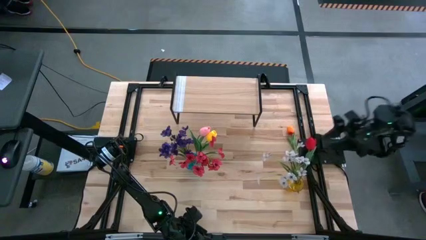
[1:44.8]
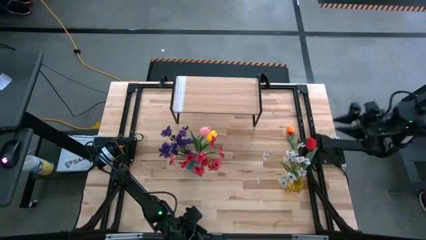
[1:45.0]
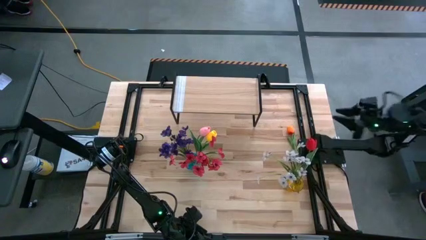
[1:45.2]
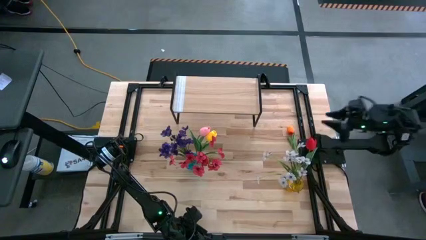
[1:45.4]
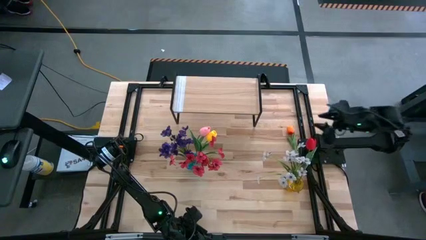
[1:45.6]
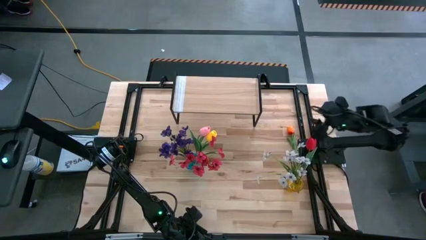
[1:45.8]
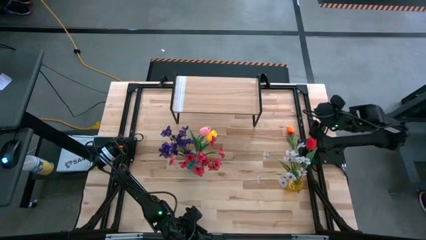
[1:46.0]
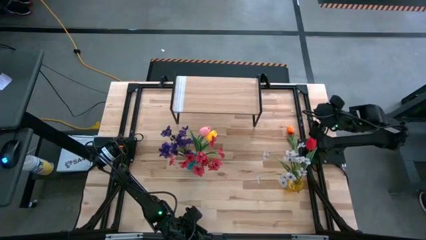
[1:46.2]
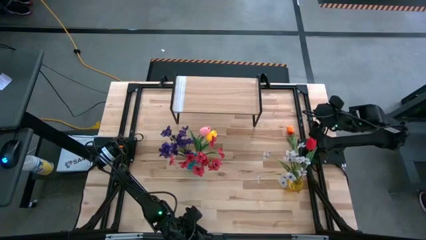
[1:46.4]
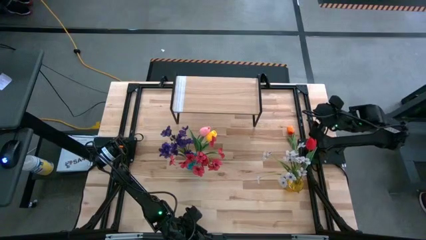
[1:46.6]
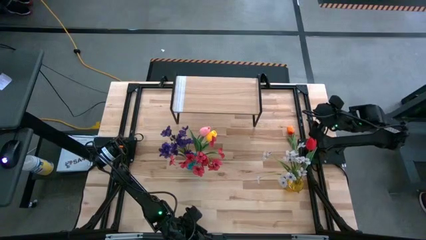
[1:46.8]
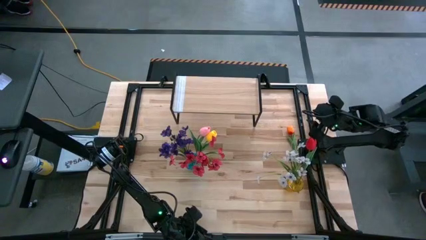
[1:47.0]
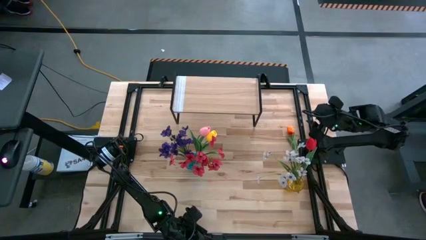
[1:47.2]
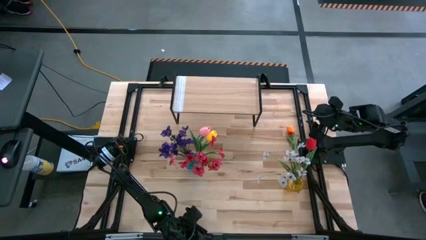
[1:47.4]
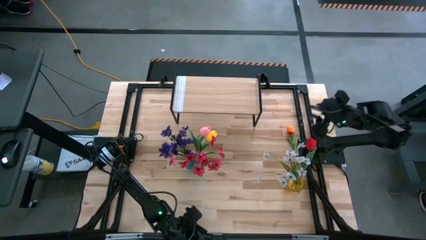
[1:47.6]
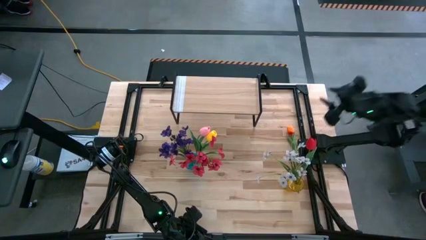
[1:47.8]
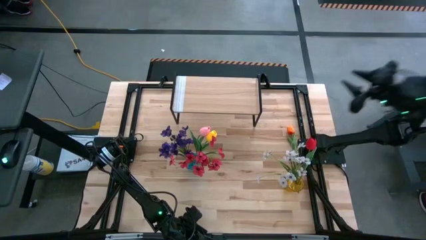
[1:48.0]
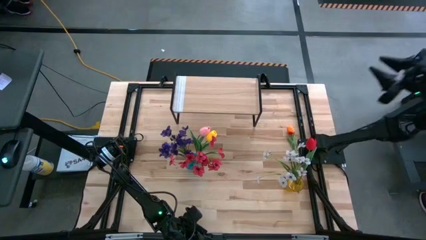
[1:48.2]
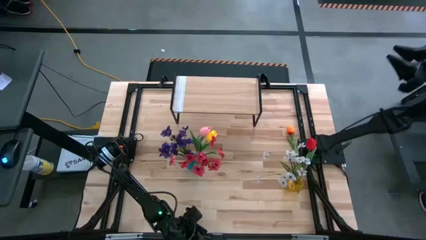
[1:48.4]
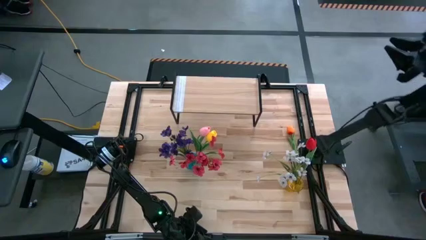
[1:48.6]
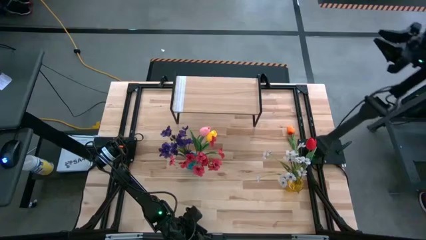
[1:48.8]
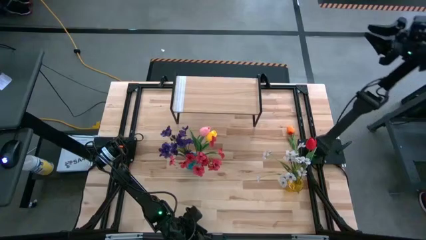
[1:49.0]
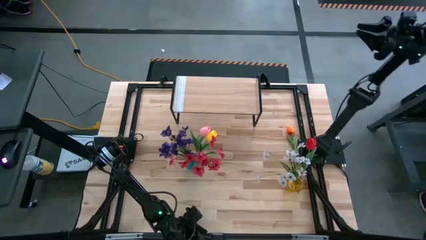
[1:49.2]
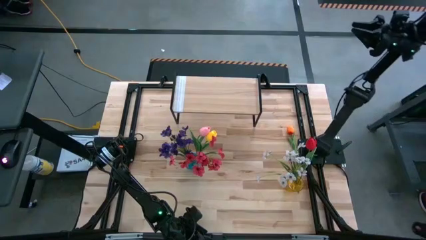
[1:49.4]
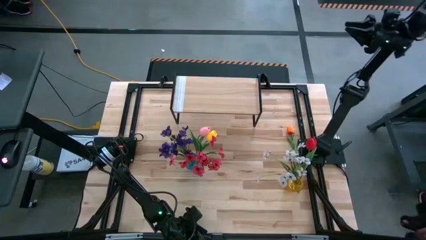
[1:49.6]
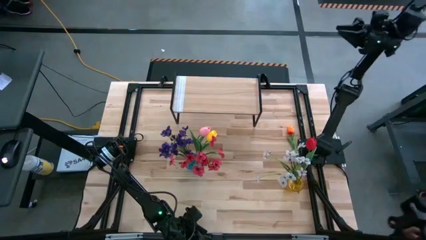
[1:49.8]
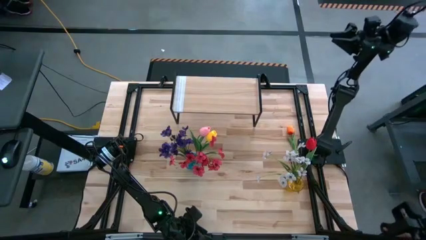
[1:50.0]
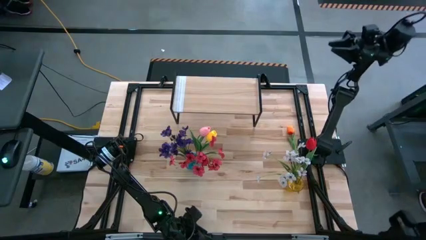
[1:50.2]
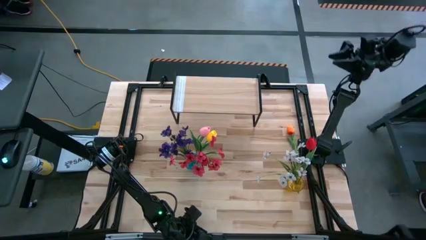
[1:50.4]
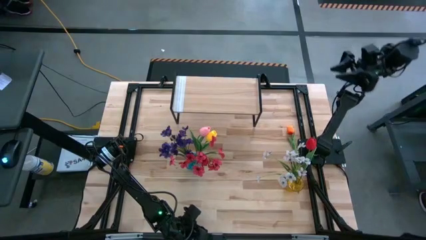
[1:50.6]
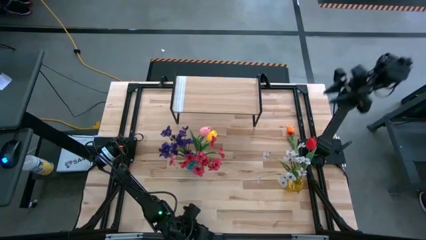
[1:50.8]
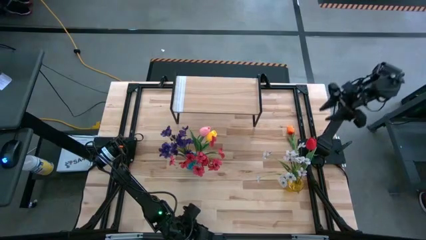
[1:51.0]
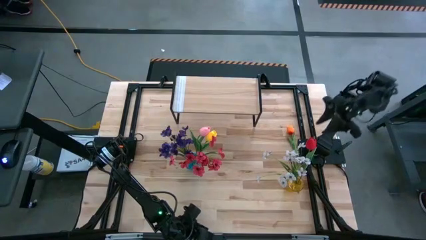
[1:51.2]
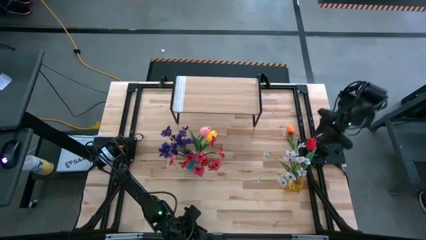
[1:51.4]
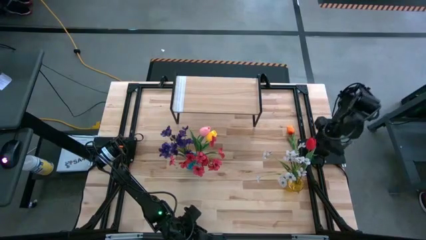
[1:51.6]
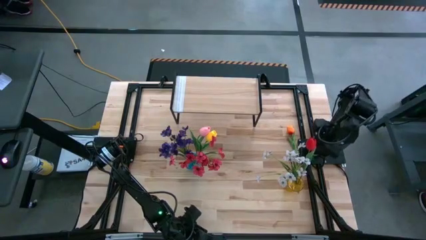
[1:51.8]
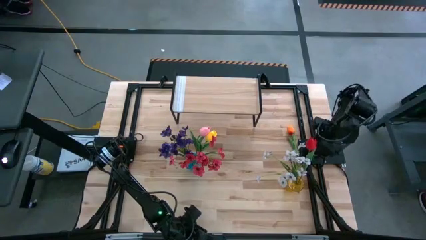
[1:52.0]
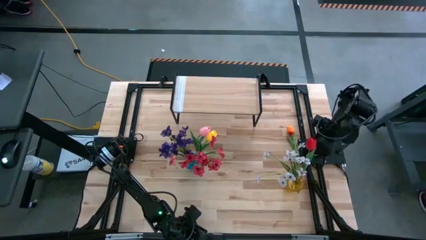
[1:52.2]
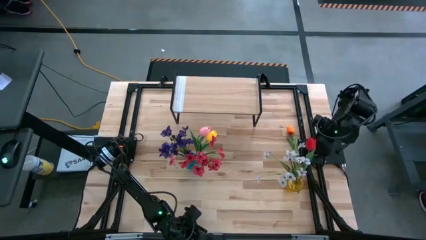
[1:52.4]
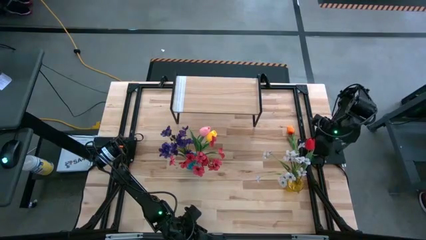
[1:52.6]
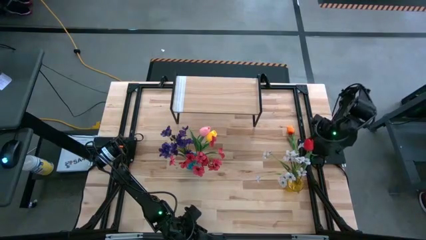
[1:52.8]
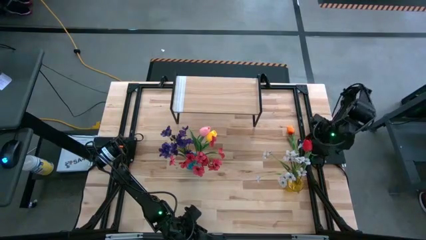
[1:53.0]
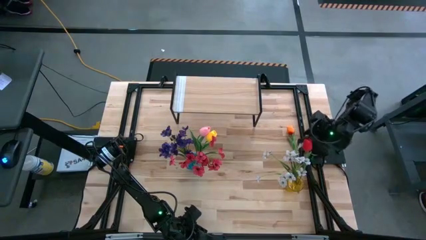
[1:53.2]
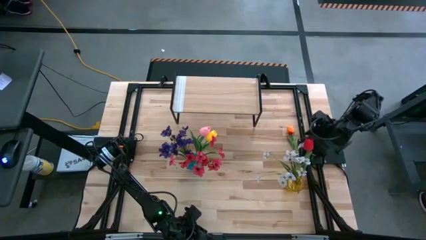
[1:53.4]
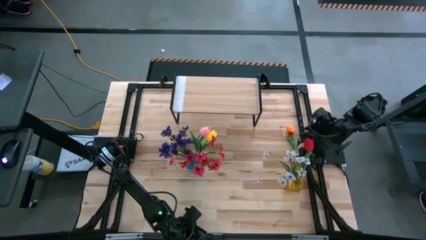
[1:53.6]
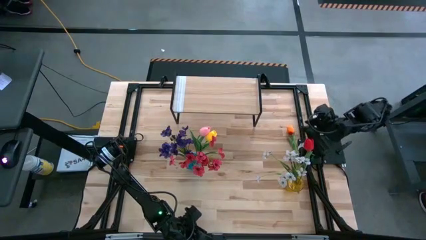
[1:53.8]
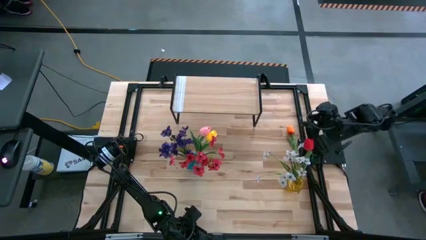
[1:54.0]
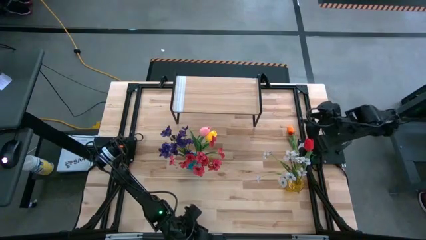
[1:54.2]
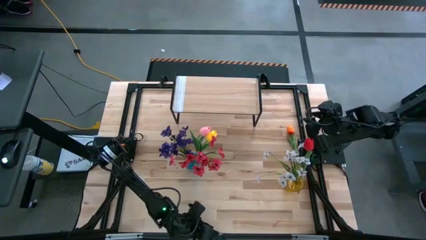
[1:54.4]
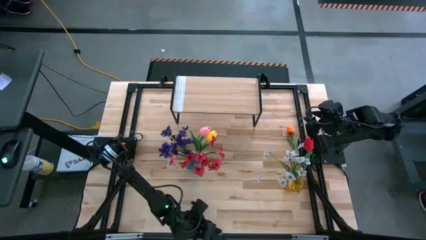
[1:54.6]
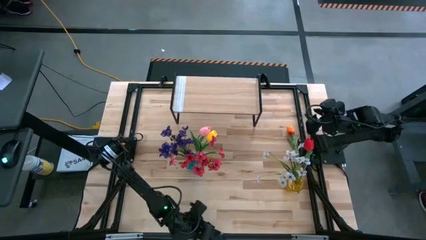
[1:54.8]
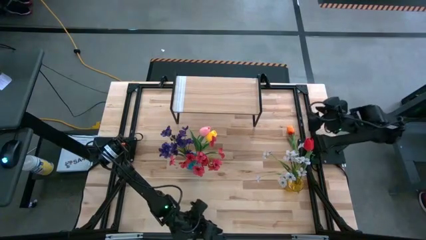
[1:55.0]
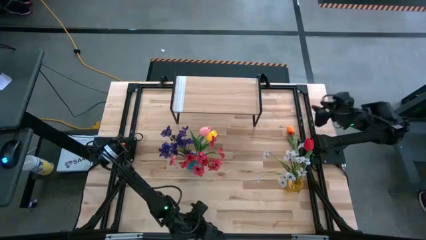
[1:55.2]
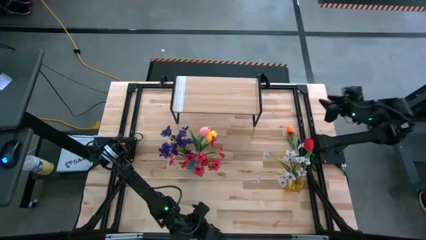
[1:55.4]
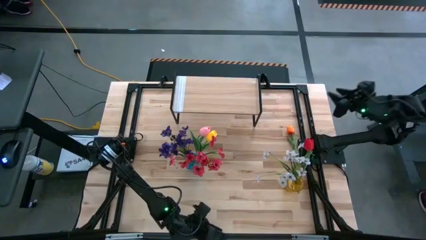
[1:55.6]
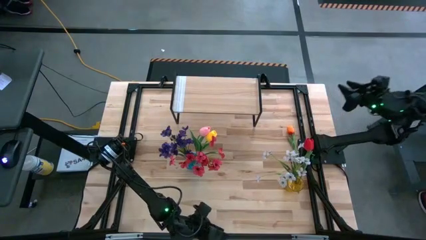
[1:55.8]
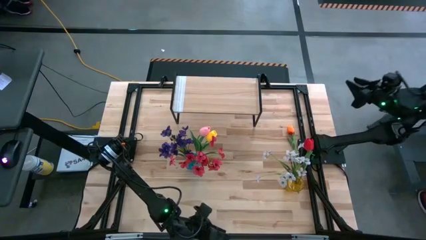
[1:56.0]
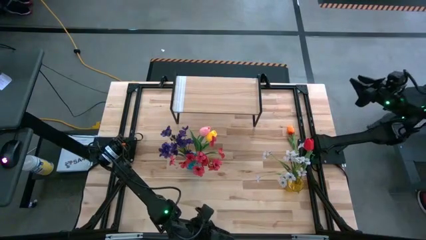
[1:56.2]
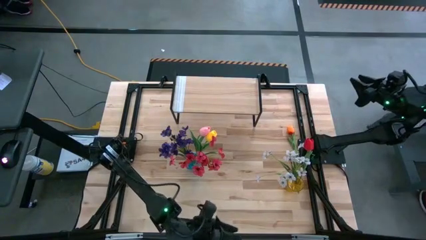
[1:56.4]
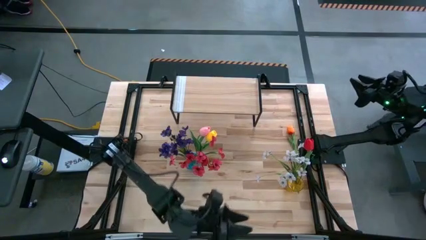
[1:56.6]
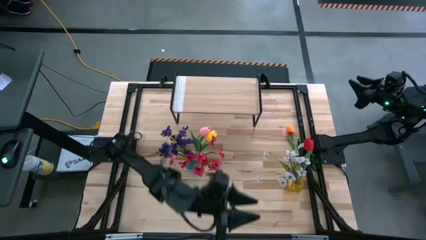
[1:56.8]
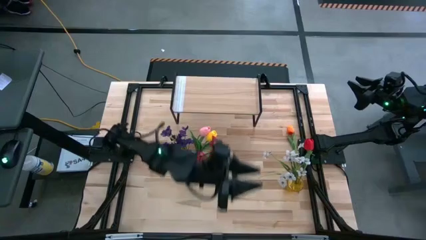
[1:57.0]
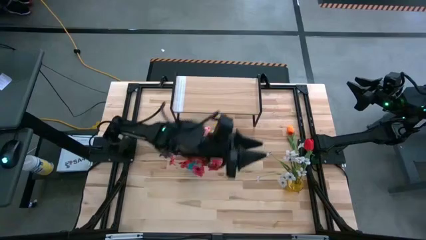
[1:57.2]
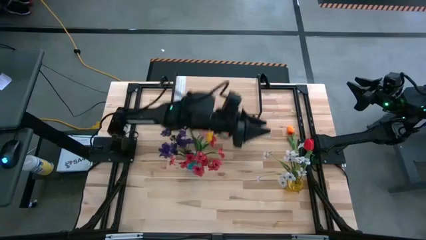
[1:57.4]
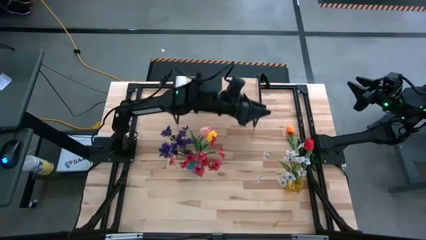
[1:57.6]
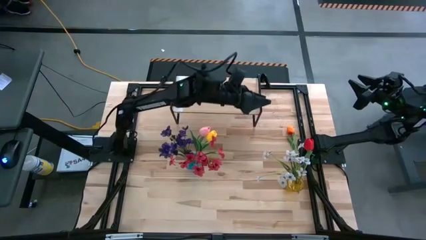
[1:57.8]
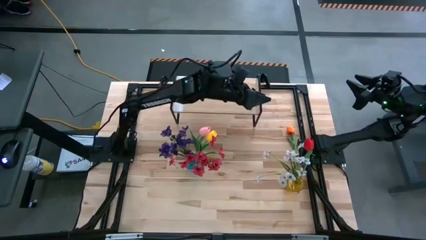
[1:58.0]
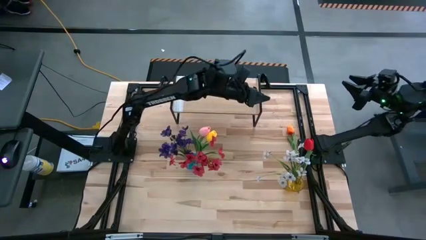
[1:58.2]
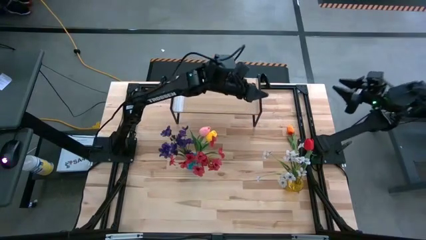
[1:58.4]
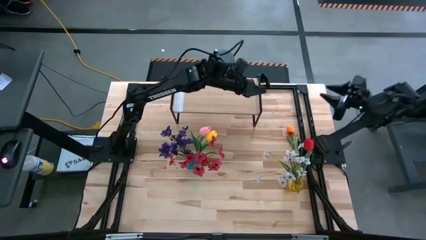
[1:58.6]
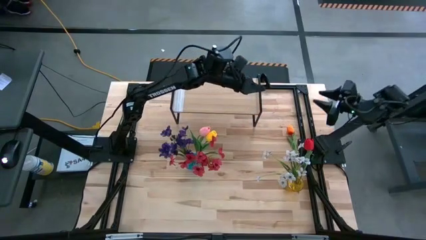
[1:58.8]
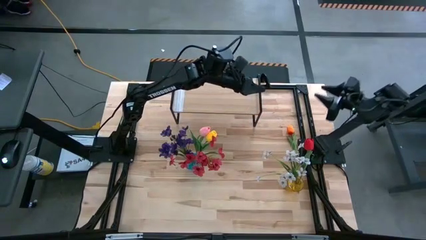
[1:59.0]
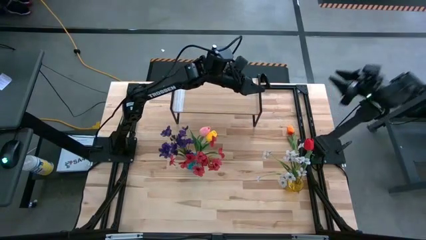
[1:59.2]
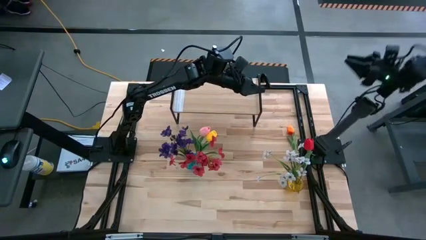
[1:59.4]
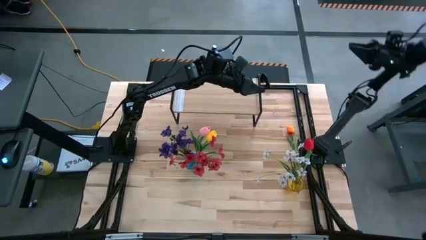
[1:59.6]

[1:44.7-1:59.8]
Task: Pick and place flowers into a vace then onto a shelf
Adjust the vases
